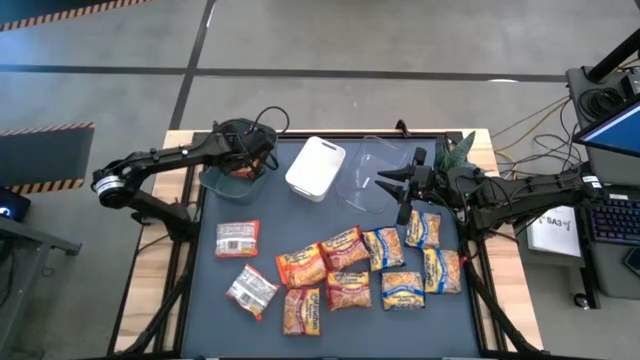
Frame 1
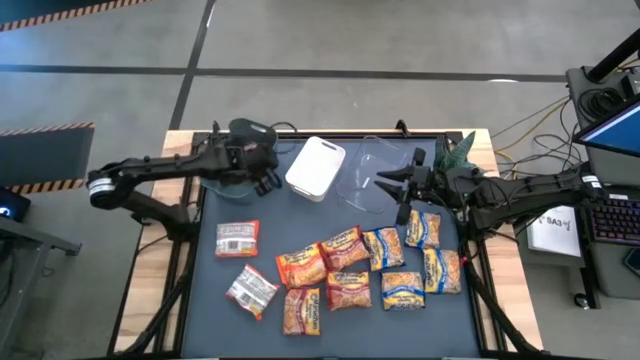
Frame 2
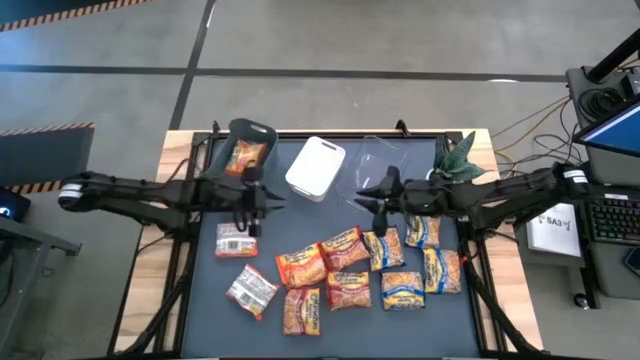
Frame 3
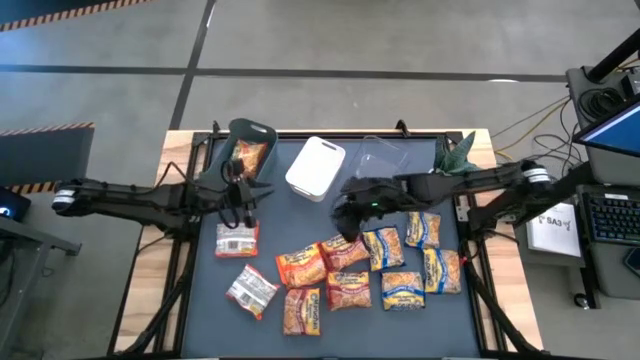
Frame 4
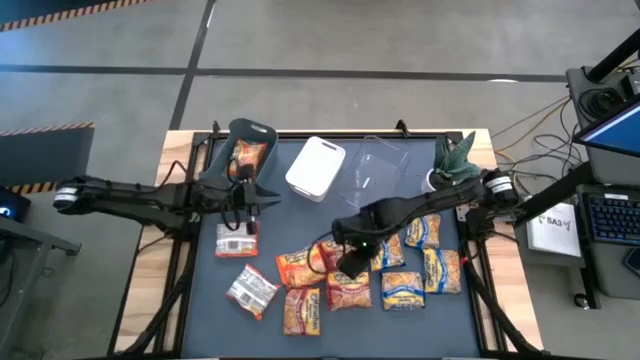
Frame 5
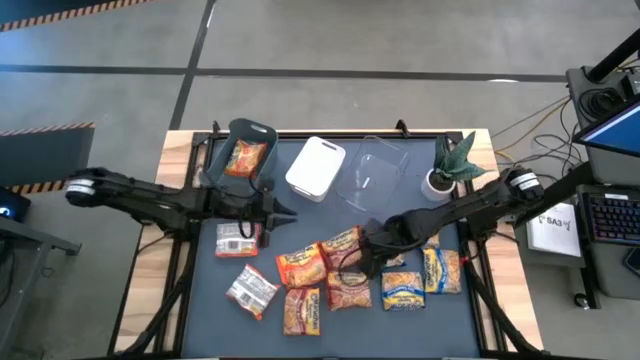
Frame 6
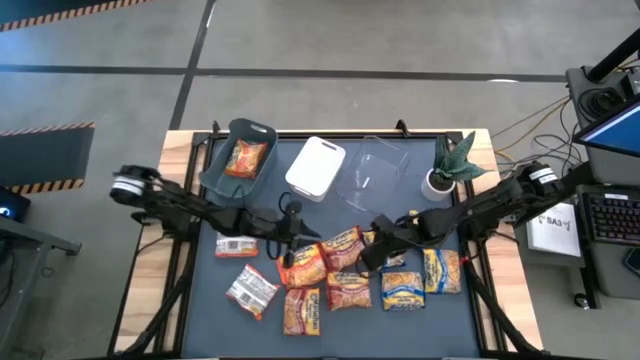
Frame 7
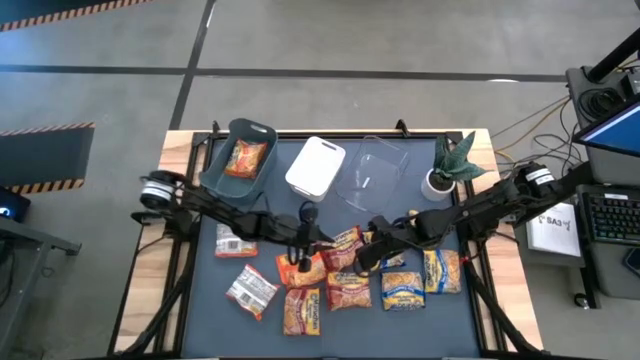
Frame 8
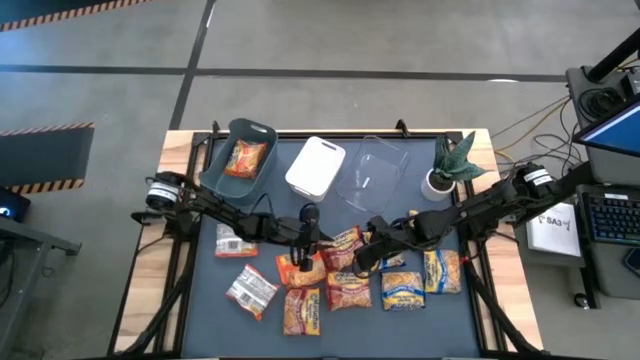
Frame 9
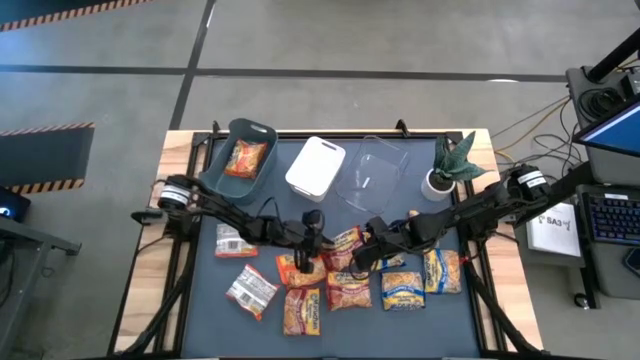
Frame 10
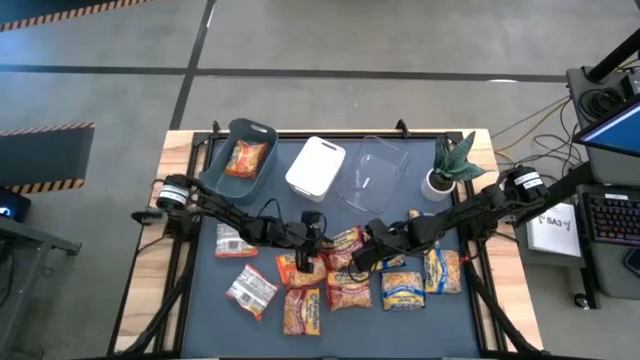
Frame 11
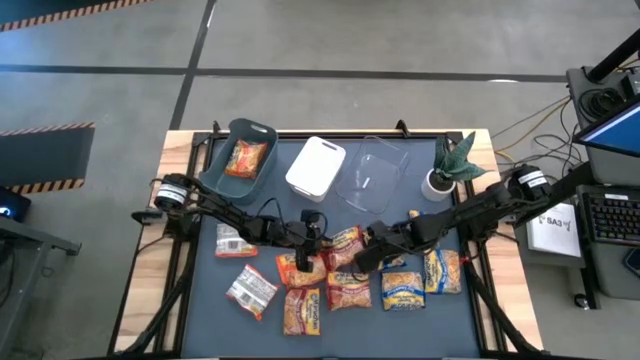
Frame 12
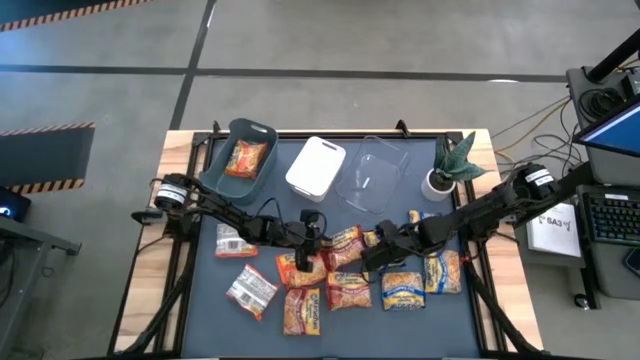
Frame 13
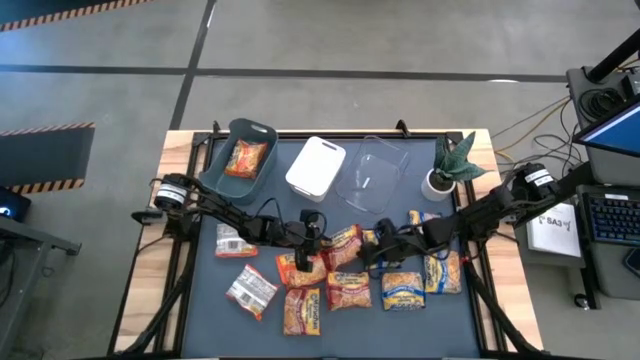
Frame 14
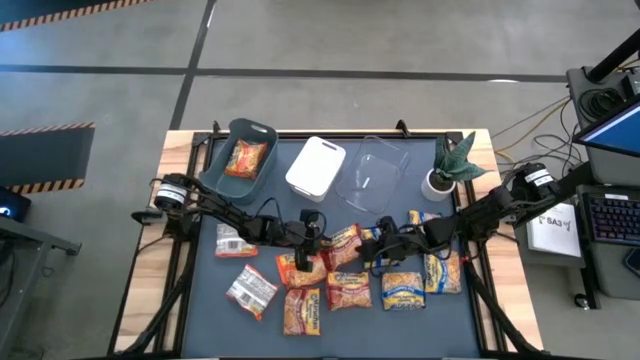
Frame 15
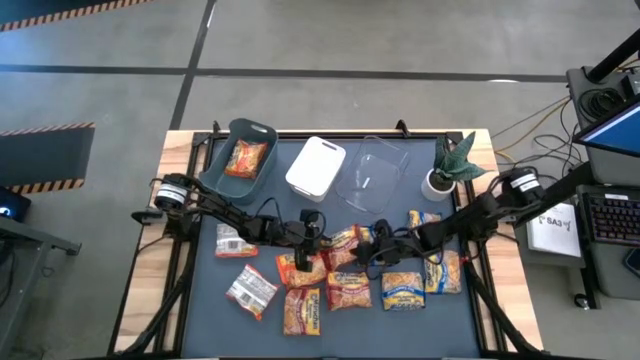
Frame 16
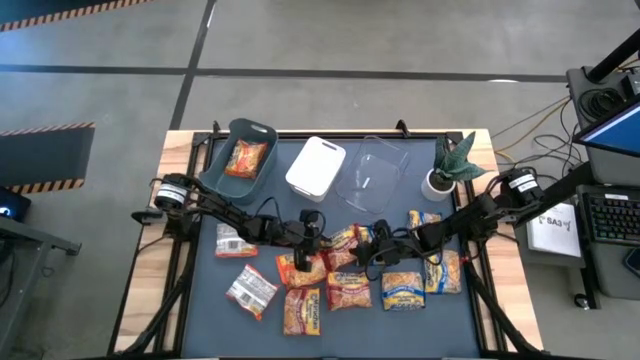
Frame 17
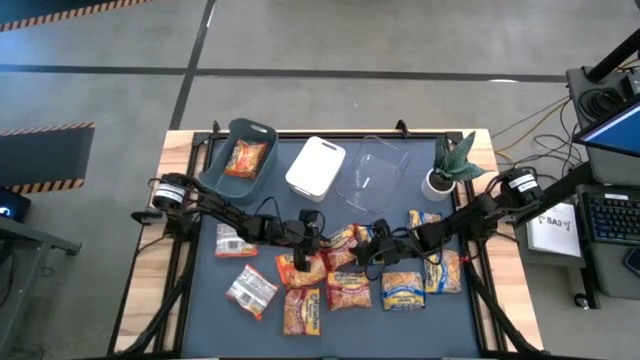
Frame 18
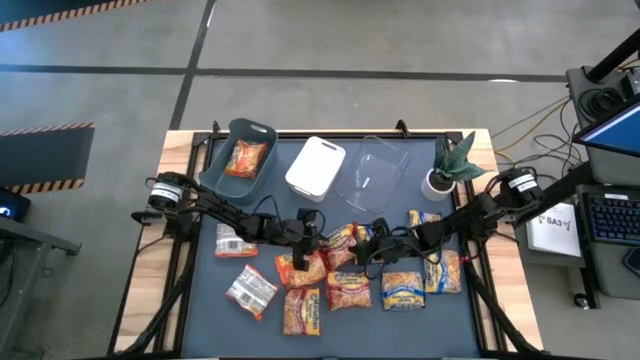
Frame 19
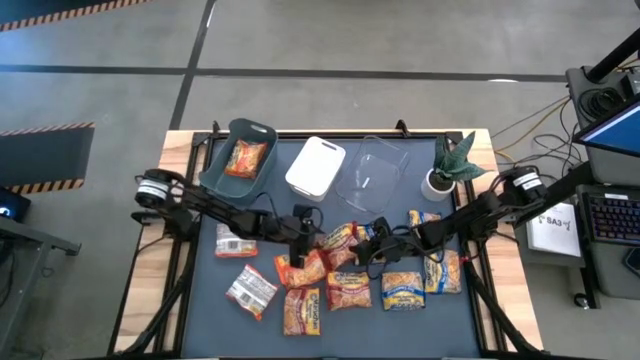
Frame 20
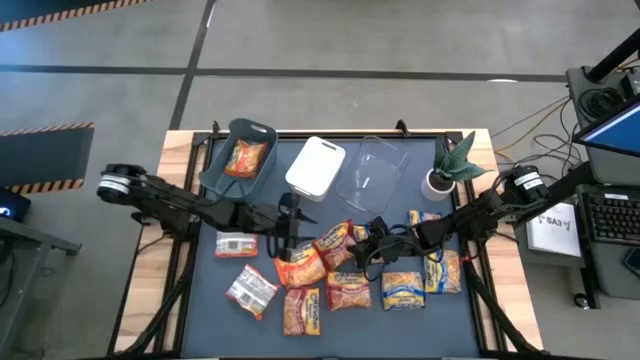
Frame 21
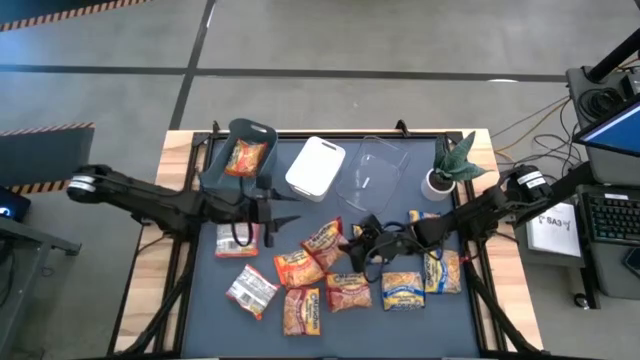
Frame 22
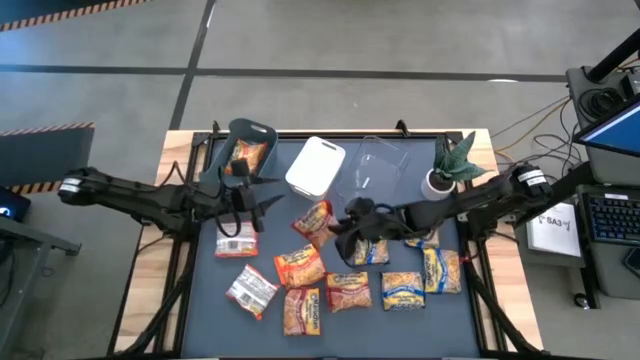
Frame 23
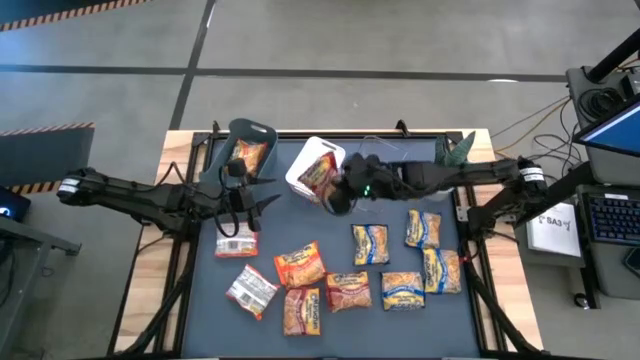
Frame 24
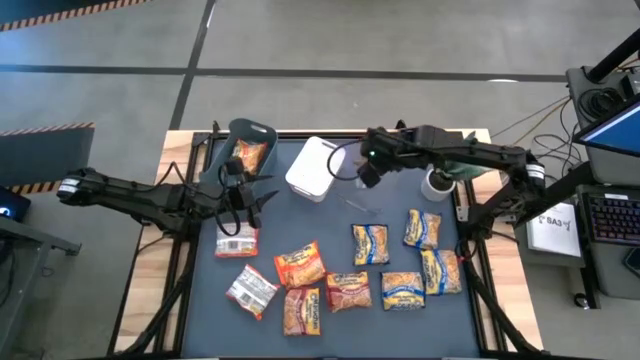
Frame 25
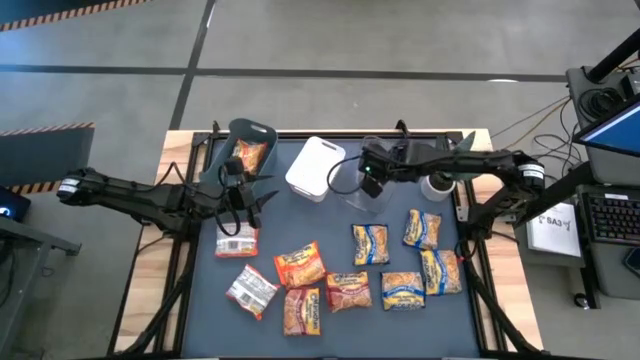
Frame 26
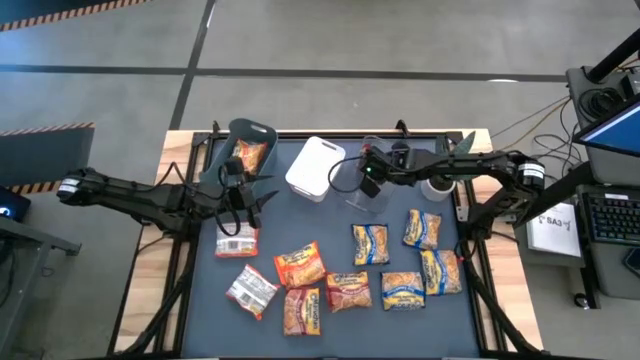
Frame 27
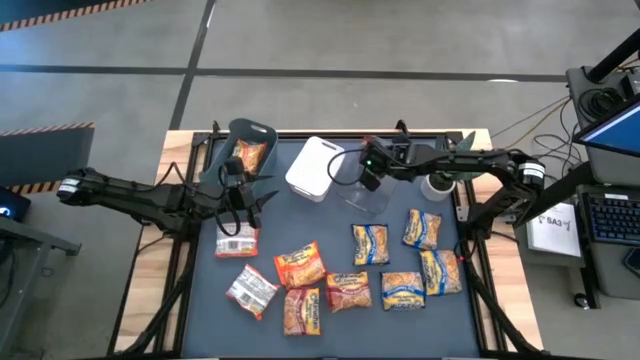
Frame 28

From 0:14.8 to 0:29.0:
Task: Sort Maruchan noodles
Put the red noodle pack into the transparent bin

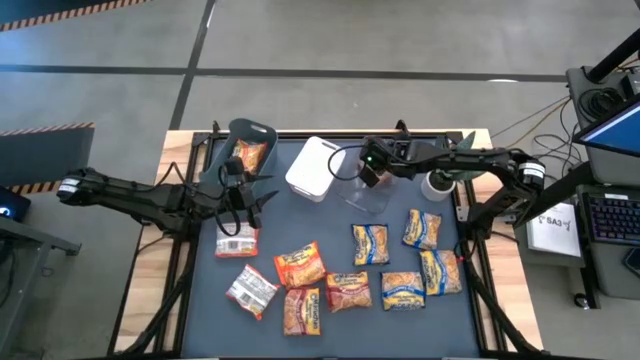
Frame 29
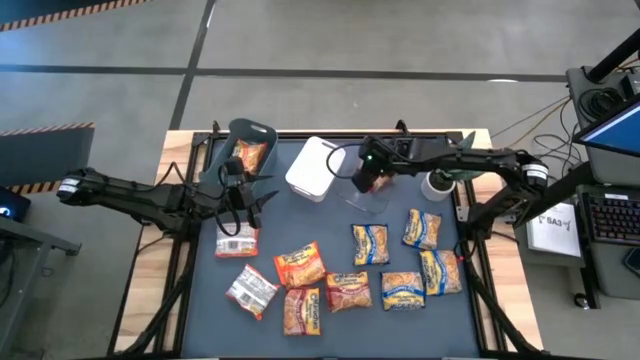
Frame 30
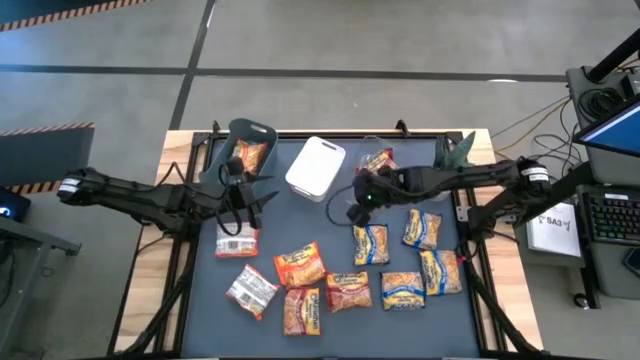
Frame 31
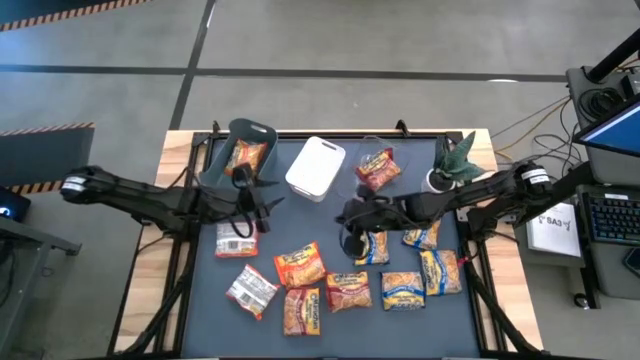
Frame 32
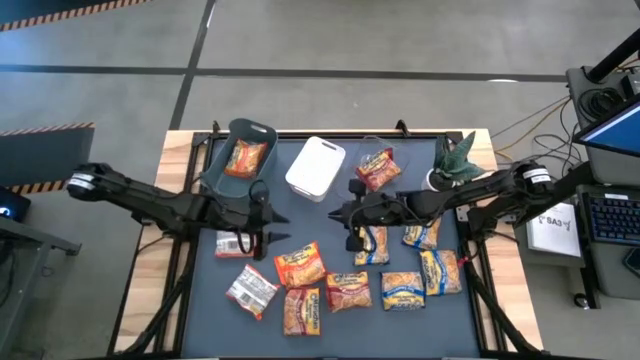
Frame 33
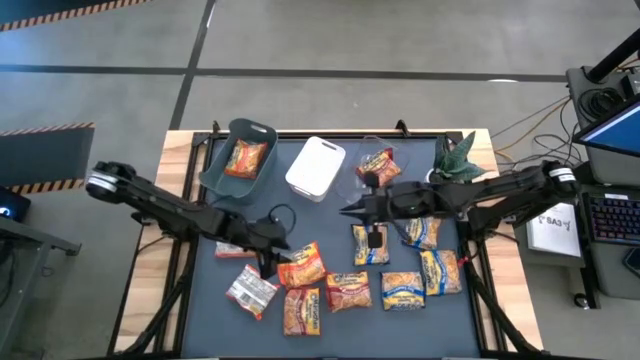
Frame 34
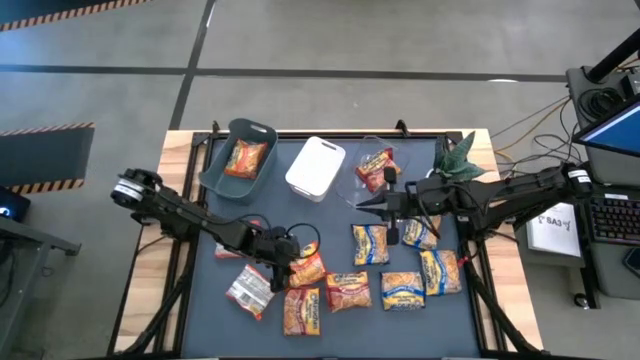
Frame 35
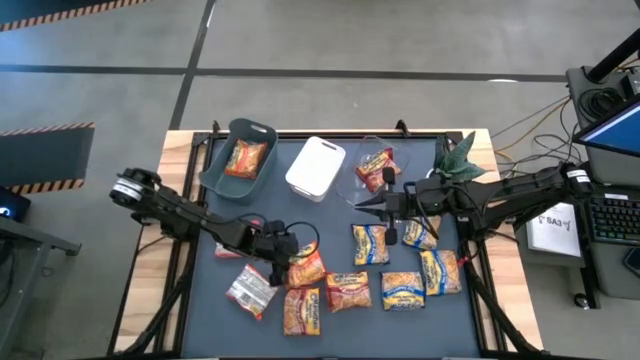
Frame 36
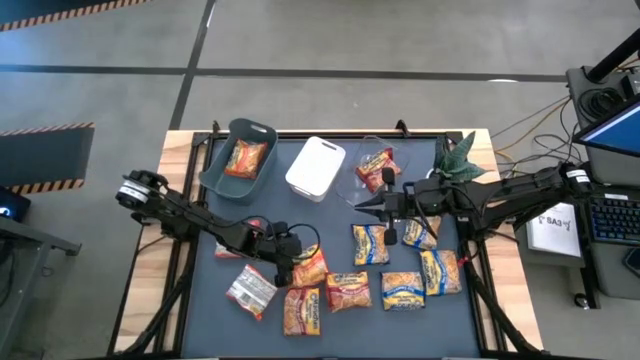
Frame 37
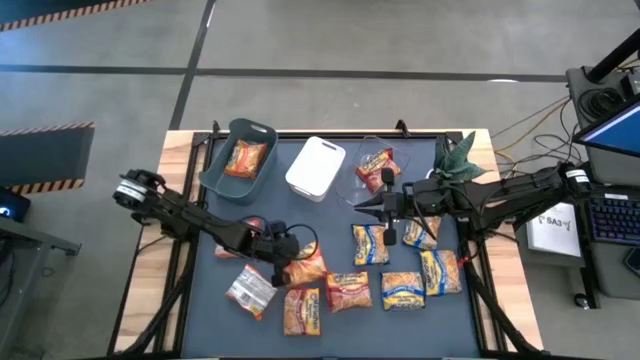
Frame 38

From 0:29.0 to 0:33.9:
Put the orange noodle pack into the blue bin

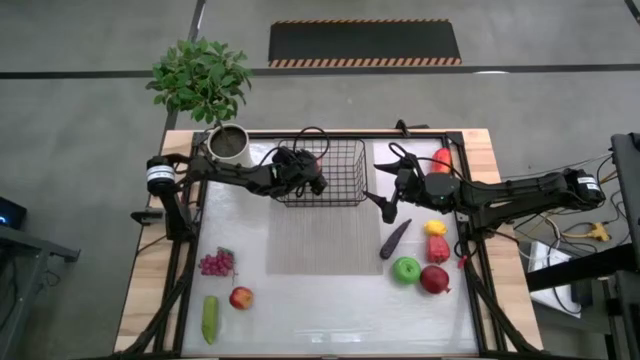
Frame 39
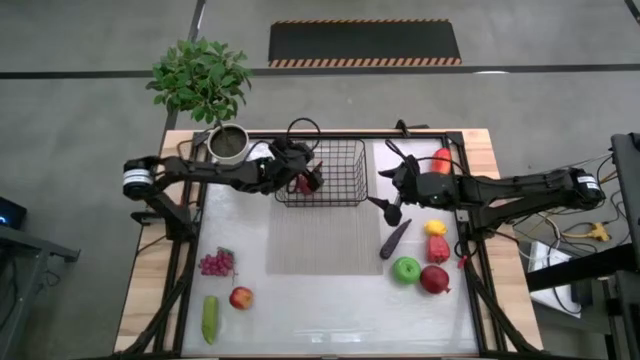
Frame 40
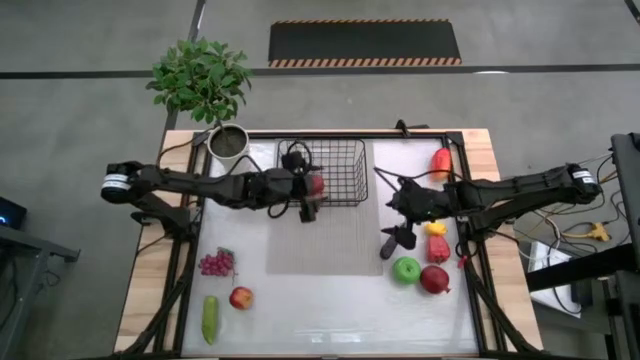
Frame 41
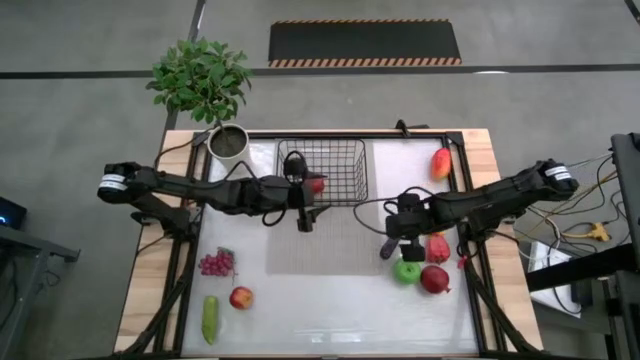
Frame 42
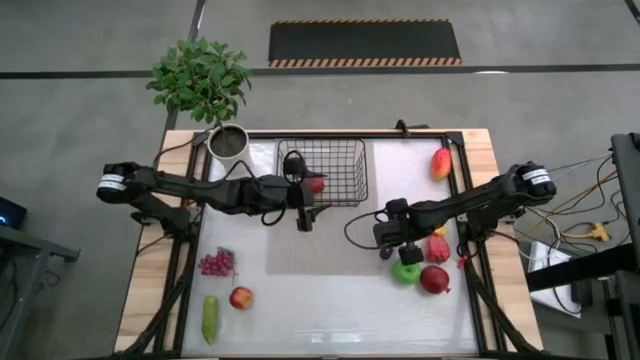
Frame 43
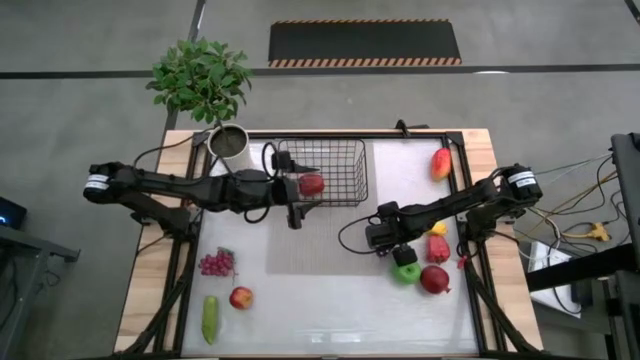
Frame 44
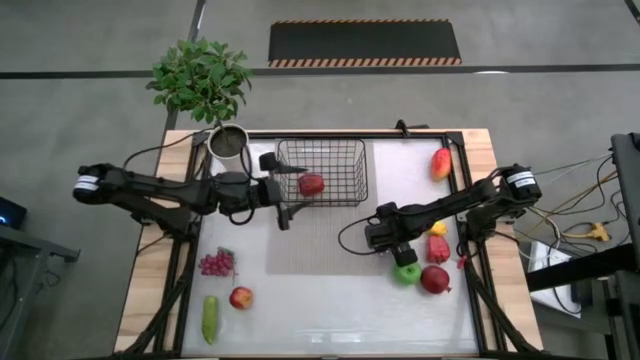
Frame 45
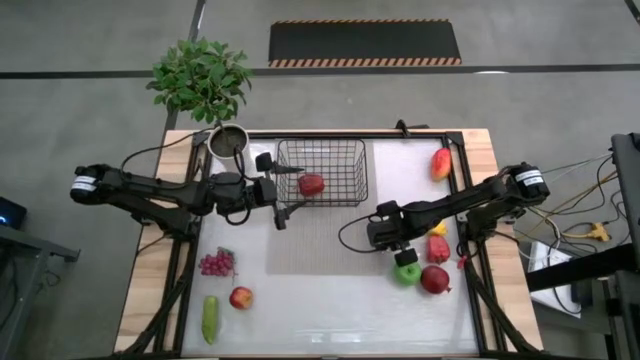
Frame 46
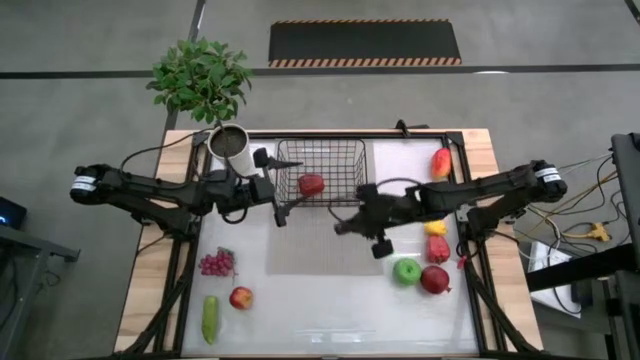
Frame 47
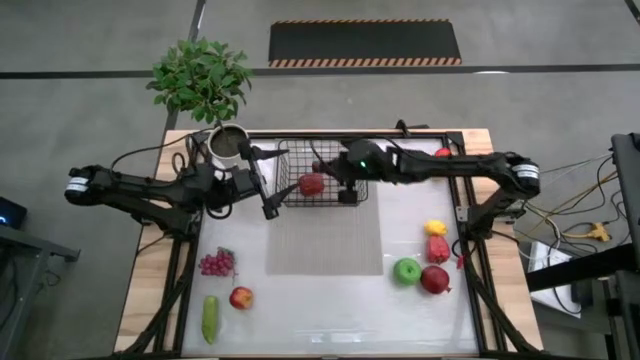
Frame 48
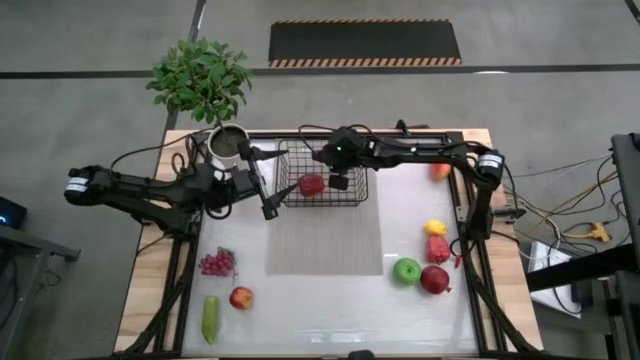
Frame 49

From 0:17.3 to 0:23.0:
Task: Build produce basket
Put the eggplant into the wire basket
